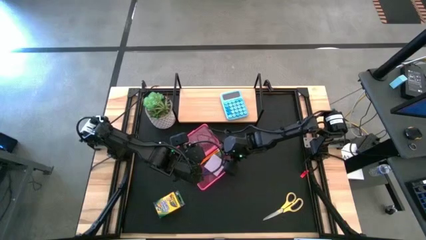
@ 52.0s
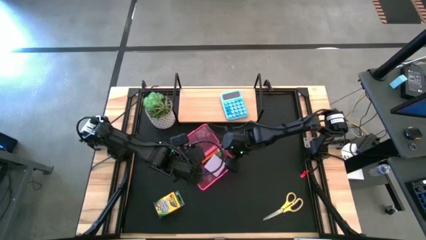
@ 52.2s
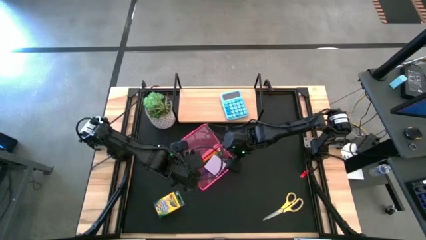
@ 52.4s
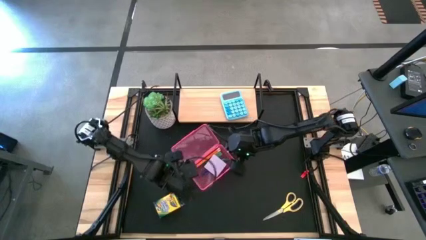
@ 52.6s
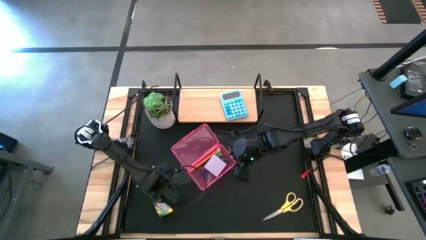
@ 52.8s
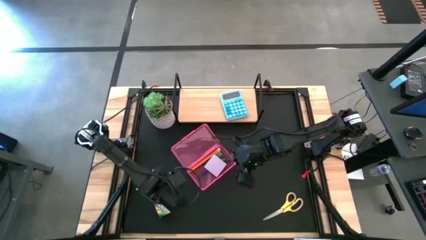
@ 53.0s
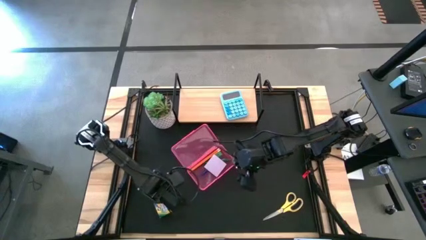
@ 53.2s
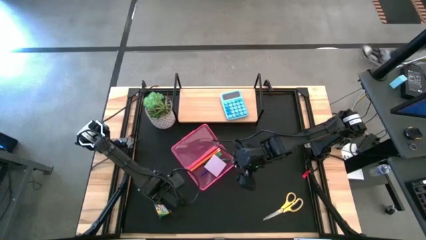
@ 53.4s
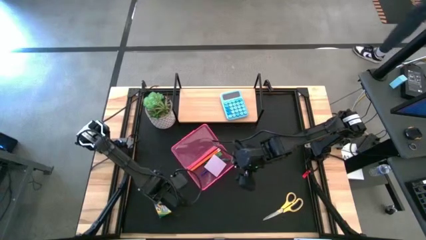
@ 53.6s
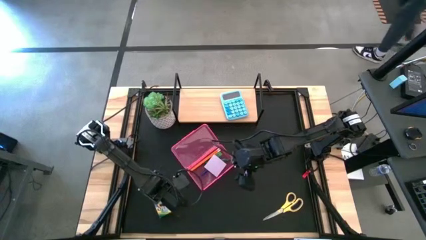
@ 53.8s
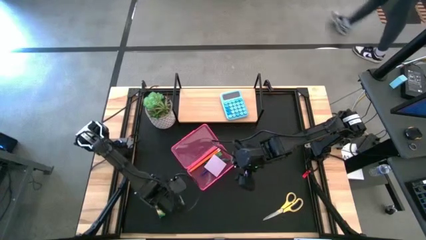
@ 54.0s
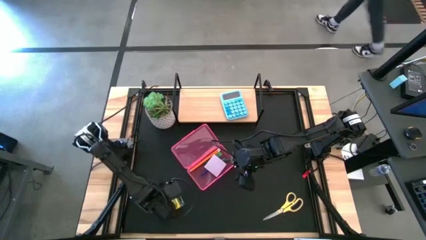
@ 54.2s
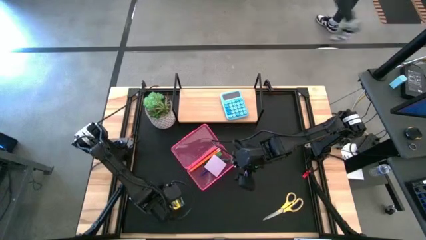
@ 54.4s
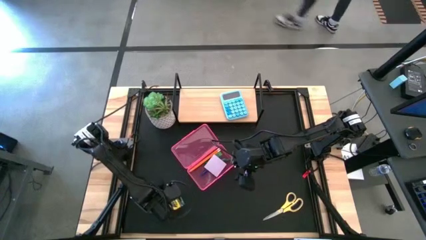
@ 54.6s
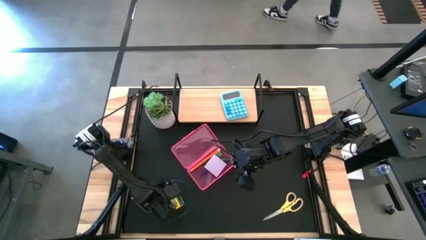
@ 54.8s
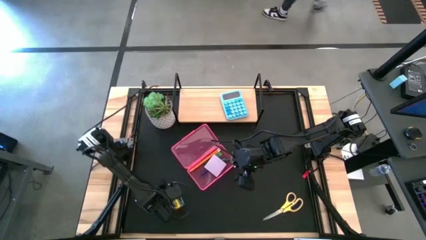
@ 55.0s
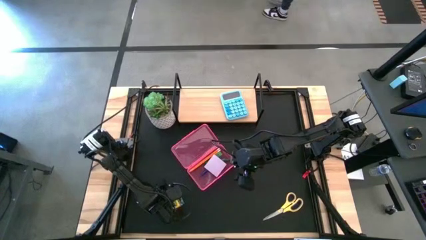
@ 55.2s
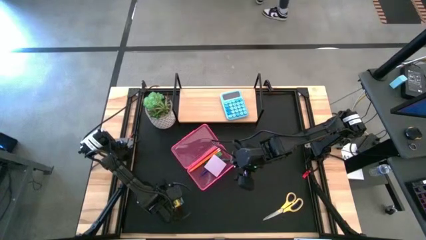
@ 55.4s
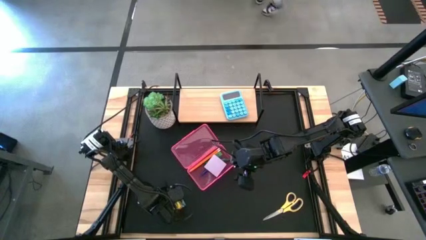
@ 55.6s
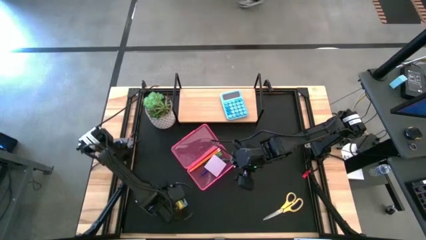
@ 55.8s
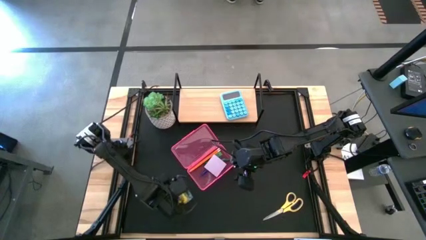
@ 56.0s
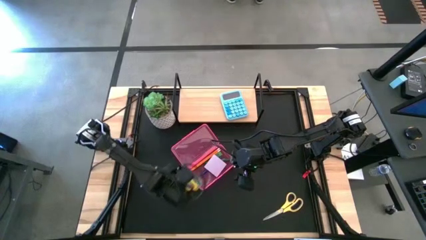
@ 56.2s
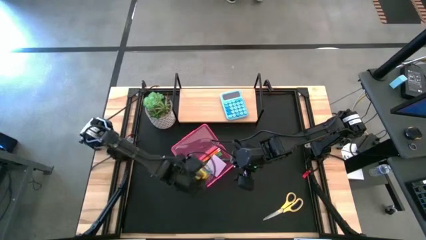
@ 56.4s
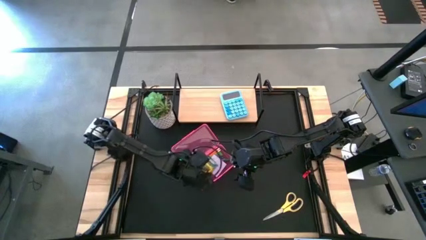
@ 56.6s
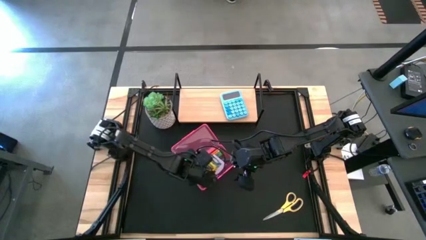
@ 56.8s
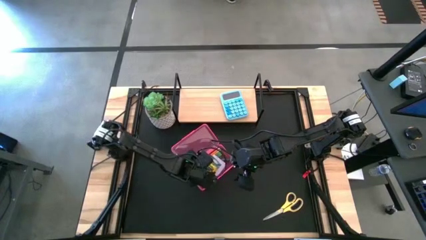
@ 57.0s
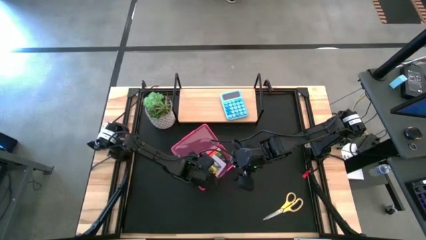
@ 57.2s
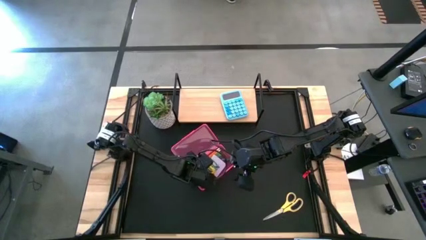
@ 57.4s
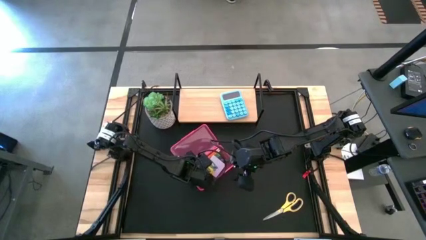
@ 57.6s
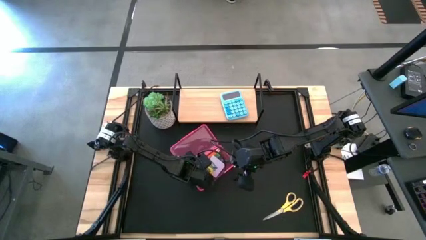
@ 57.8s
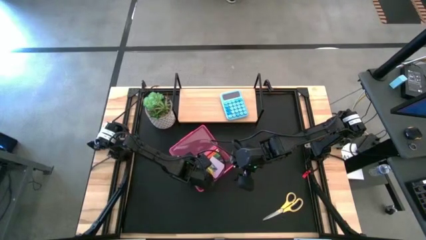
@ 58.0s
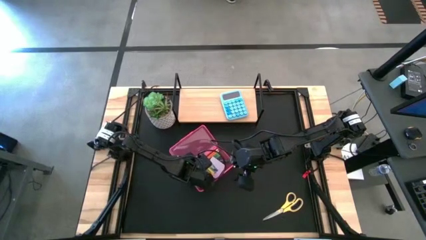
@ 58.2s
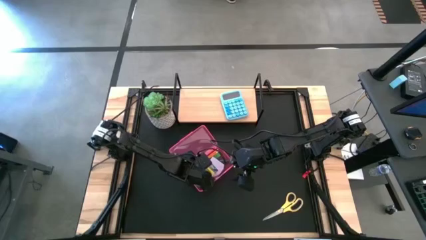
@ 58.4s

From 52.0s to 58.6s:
Task: Pack school essentials
Put the yellow crayon box into the red supply box

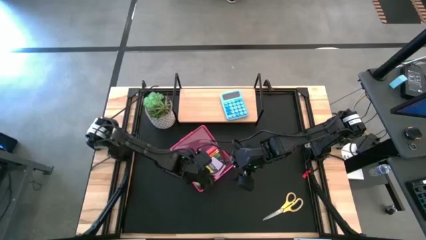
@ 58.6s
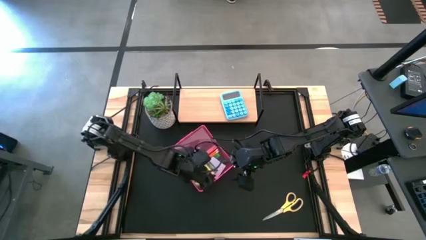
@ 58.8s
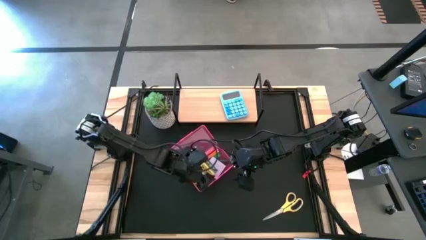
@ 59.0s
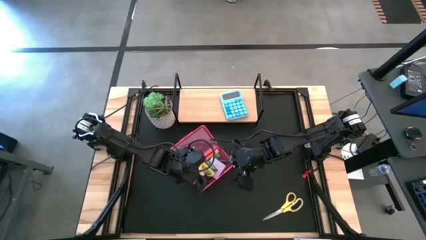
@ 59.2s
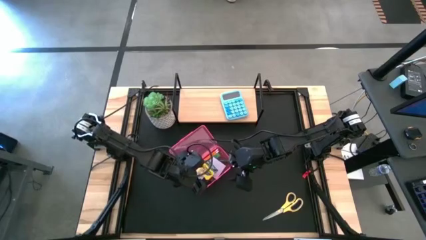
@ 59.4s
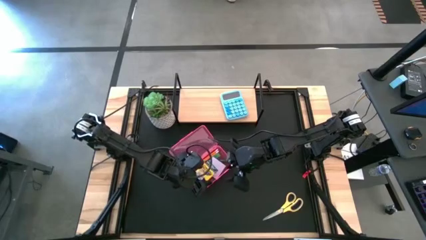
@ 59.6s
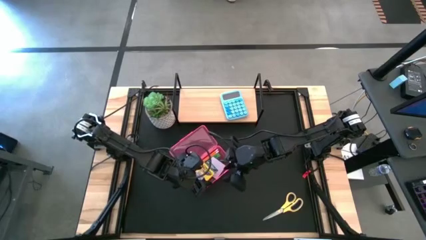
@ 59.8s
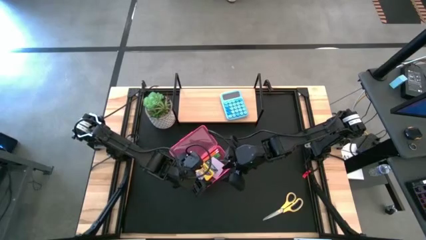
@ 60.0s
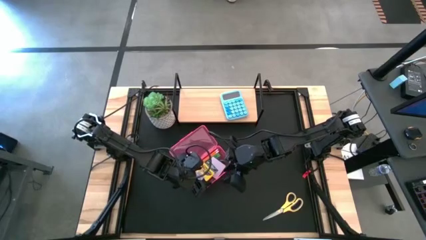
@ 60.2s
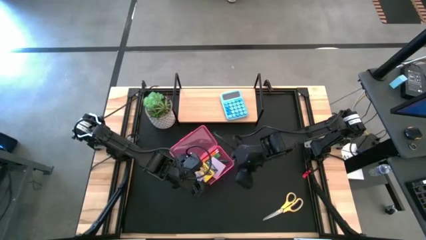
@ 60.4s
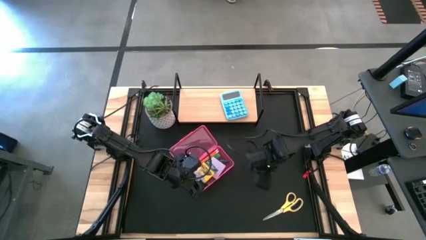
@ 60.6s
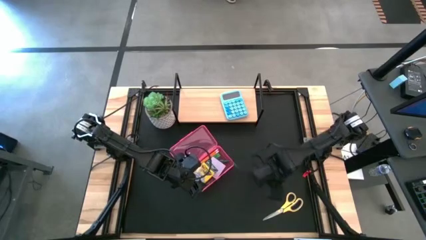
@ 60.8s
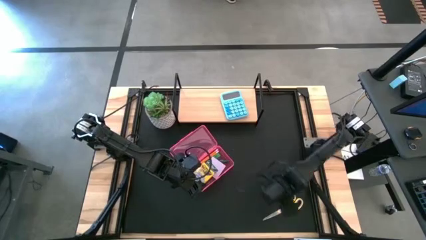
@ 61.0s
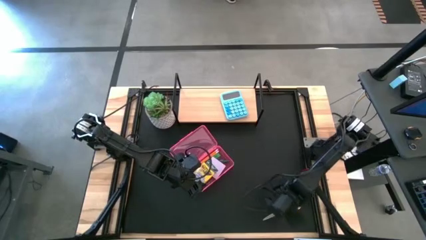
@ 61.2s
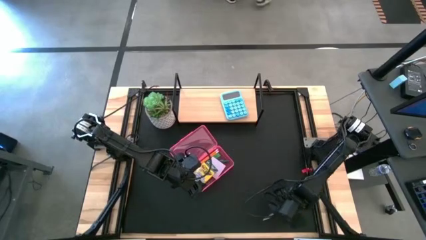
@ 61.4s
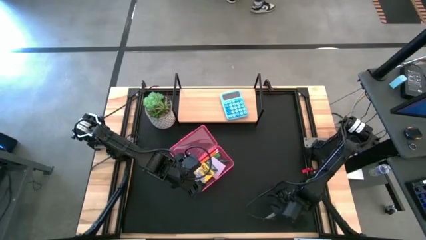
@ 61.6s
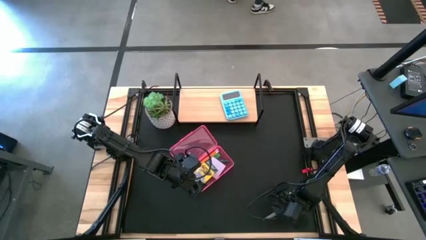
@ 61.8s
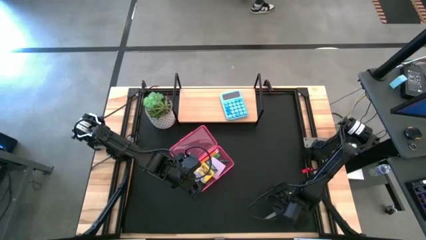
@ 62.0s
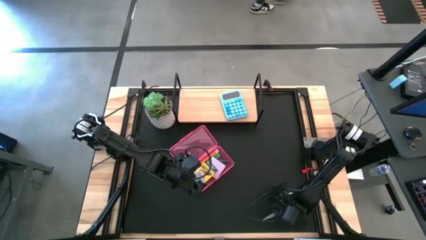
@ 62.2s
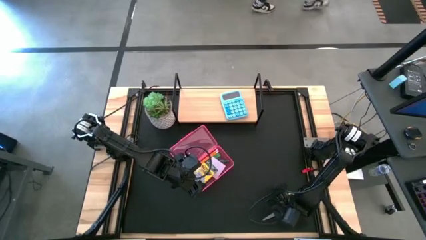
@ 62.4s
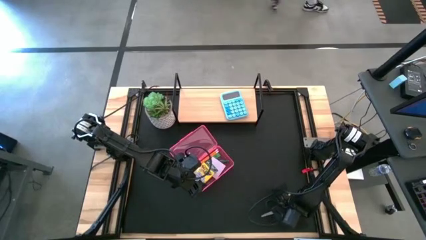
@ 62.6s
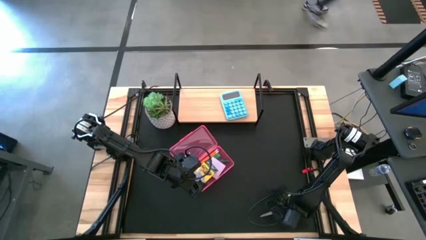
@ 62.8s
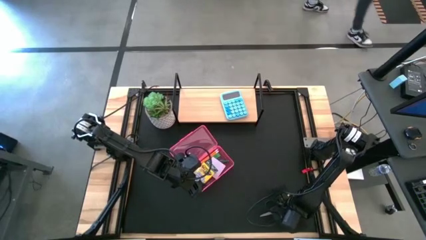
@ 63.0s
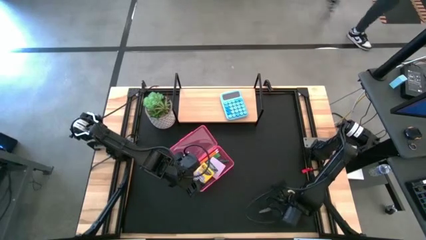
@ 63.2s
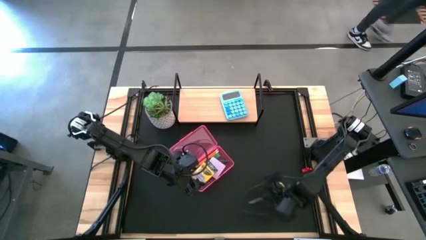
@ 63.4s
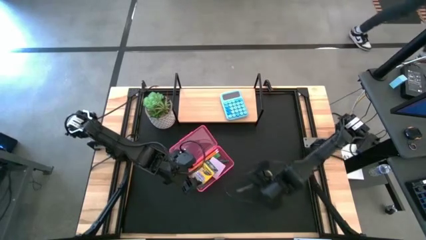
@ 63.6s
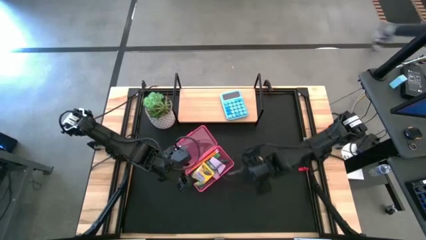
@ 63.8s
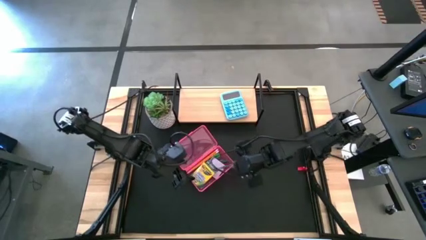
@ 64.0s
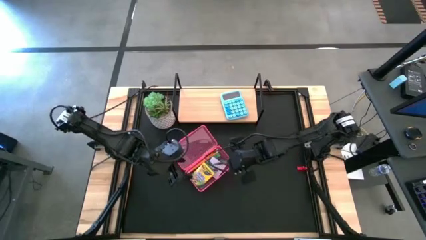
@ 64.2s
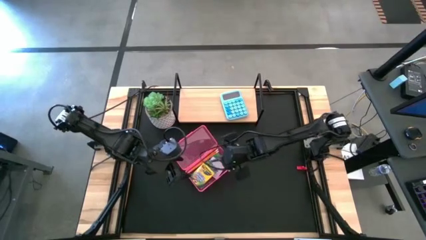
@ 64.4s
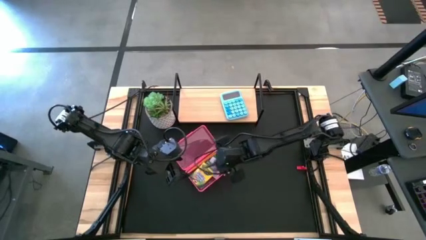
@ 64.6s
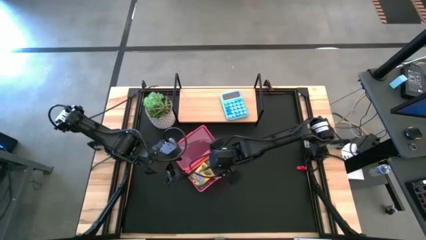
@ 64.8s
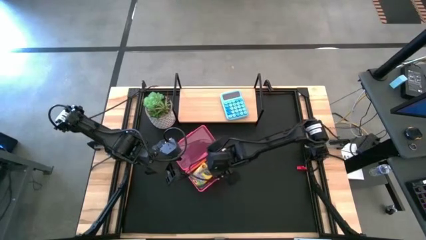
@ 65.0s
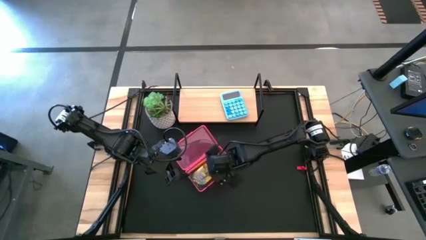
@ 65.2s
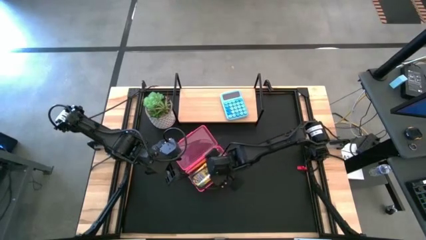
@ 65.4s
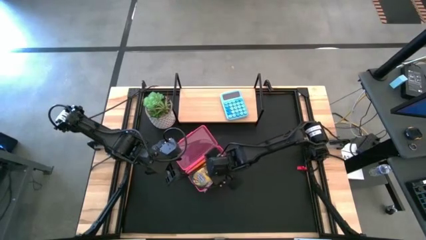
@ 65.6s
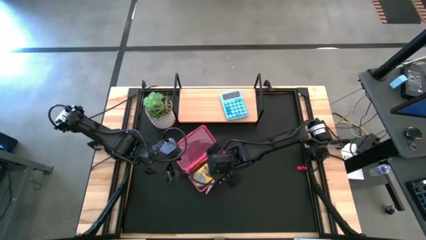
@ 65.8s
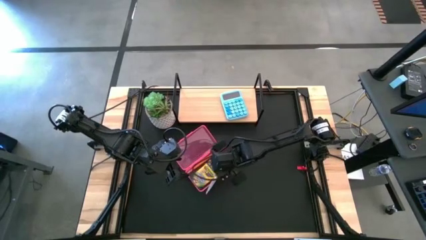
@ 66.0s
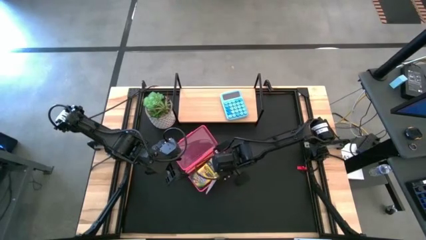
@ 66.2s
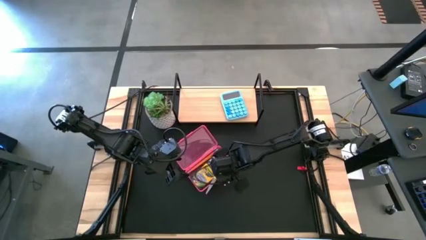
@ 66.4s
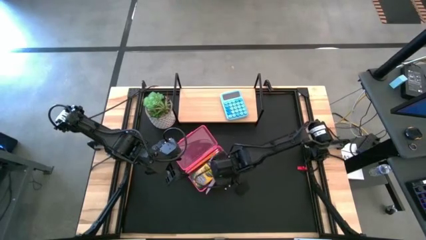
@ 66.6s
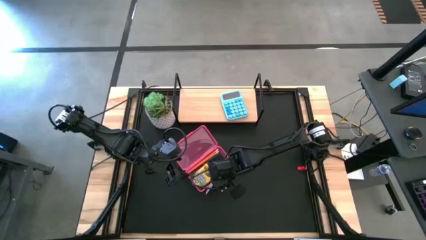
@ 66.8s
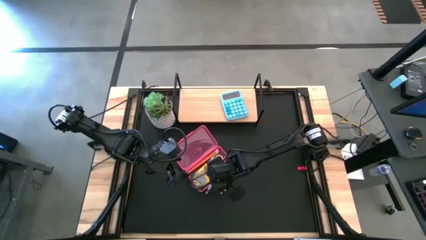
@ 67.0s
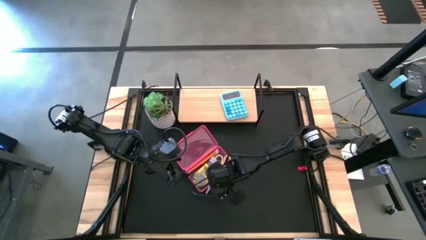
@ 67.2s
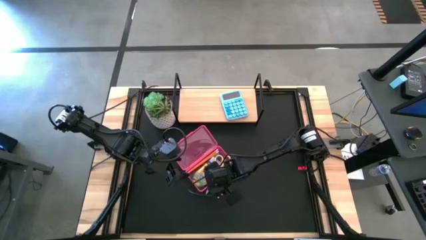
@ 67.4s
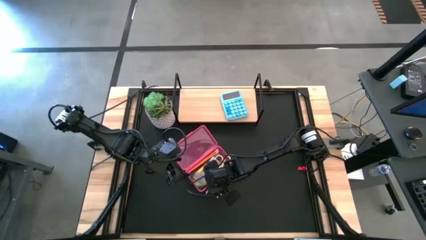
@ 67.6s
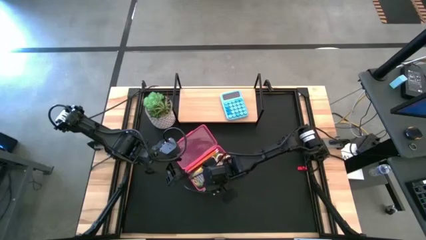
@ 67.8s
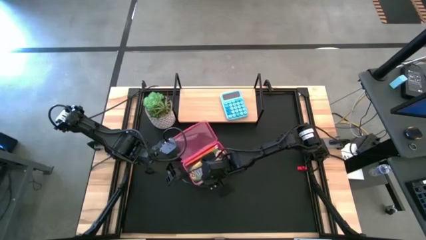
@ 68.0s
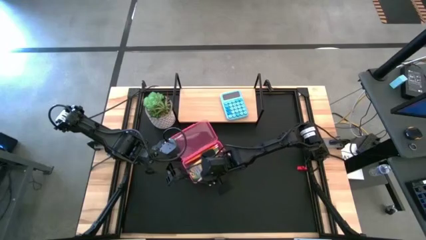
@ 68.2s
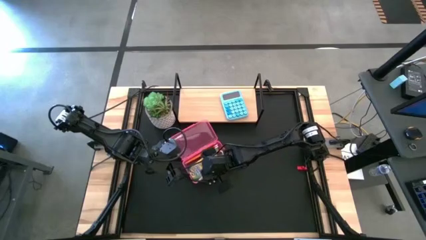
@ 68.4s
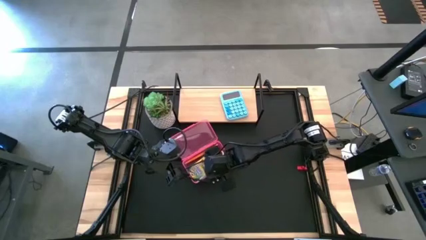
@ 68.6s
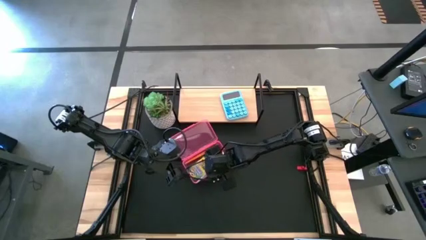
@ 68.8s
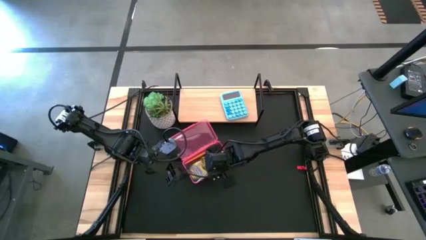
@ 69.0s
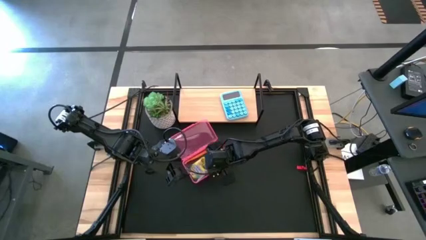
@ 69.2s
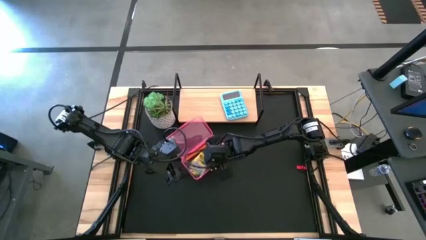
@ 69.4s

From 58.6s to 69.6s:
Put the yellow scissors into the red supply box
